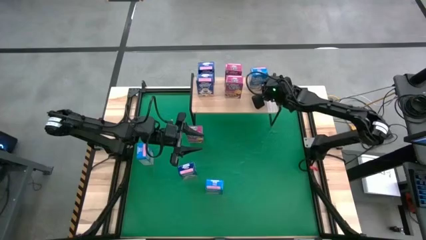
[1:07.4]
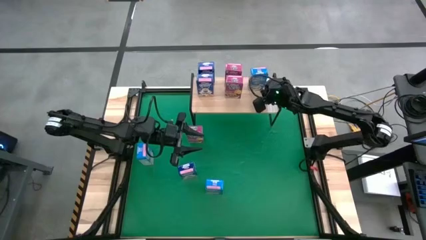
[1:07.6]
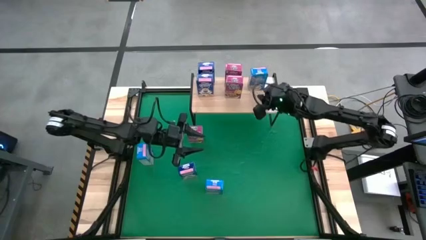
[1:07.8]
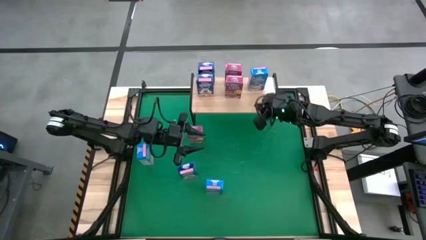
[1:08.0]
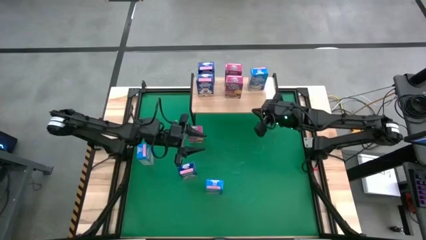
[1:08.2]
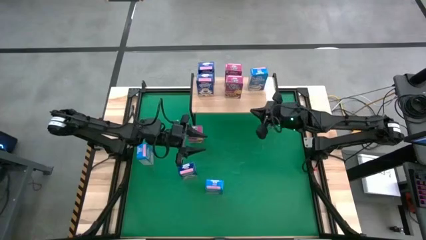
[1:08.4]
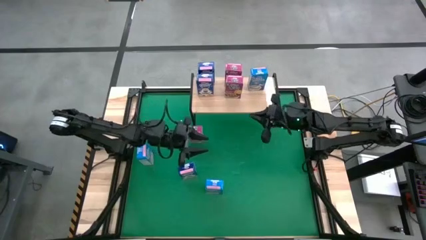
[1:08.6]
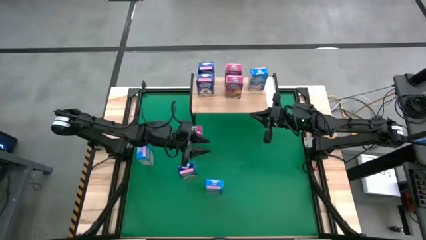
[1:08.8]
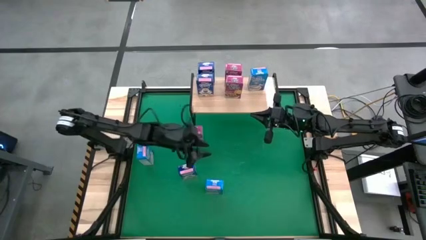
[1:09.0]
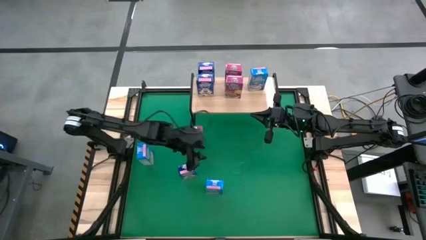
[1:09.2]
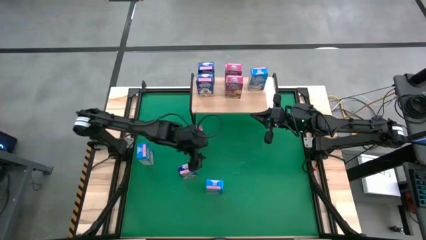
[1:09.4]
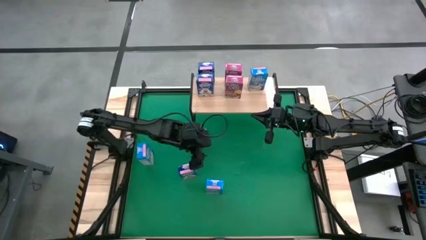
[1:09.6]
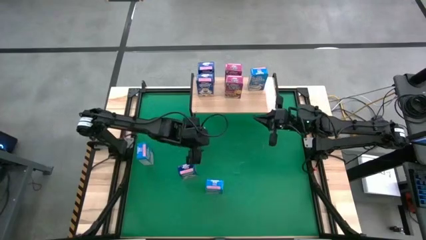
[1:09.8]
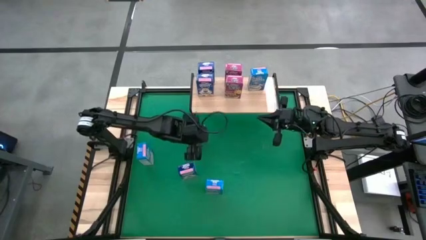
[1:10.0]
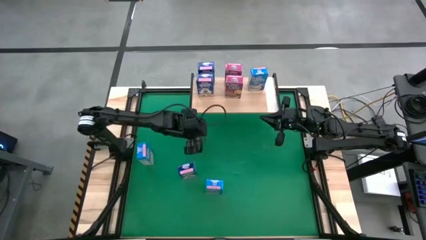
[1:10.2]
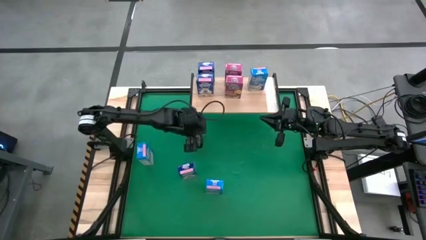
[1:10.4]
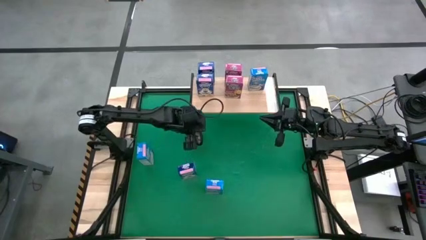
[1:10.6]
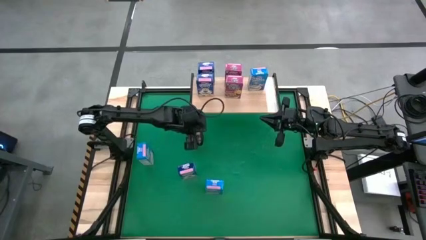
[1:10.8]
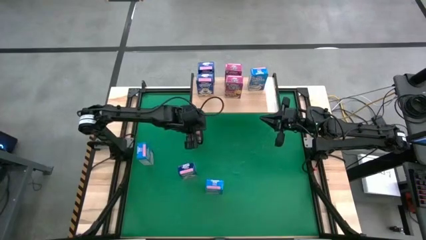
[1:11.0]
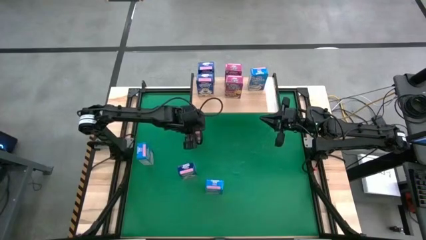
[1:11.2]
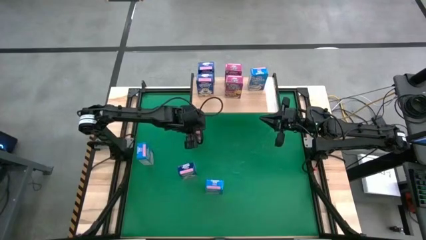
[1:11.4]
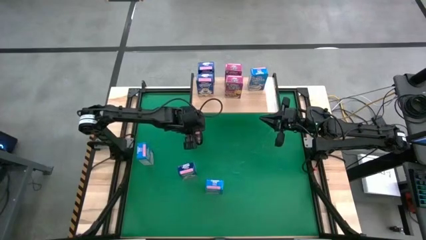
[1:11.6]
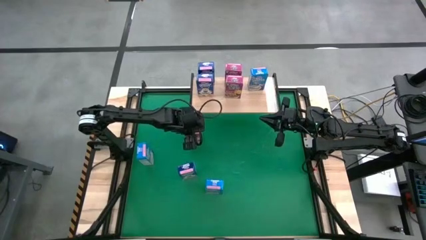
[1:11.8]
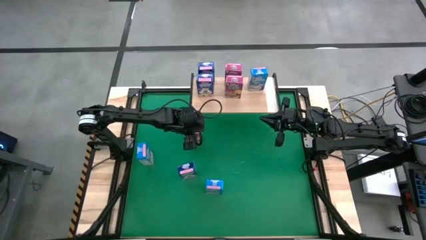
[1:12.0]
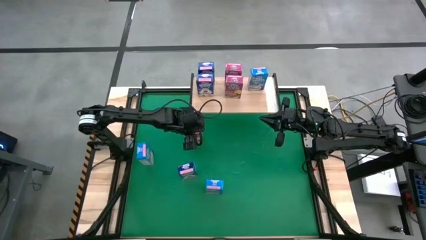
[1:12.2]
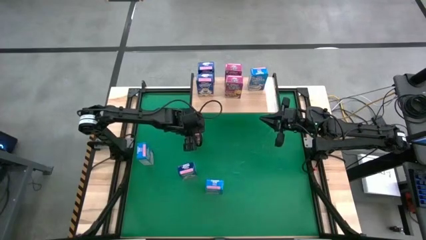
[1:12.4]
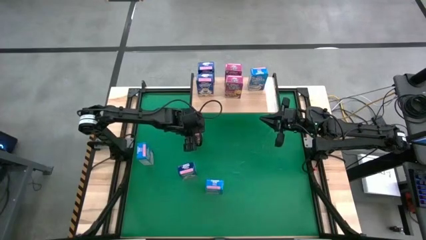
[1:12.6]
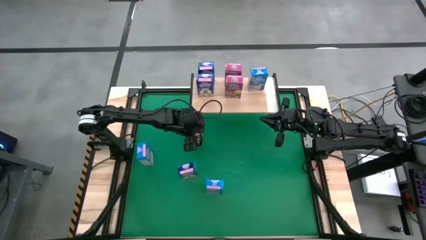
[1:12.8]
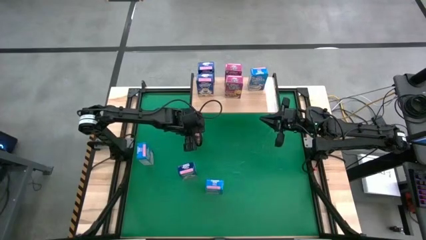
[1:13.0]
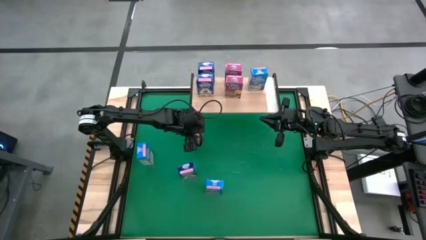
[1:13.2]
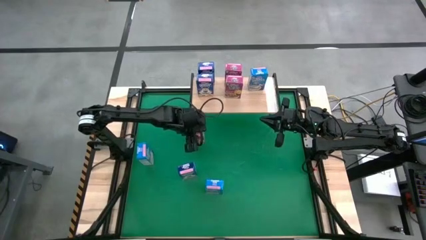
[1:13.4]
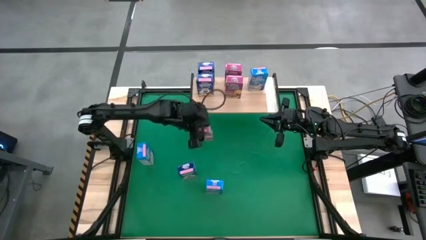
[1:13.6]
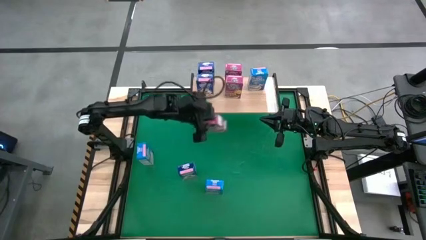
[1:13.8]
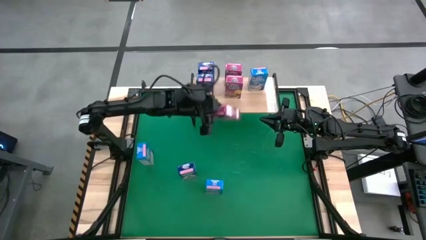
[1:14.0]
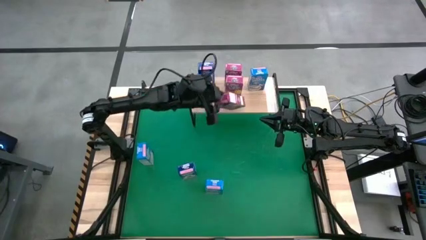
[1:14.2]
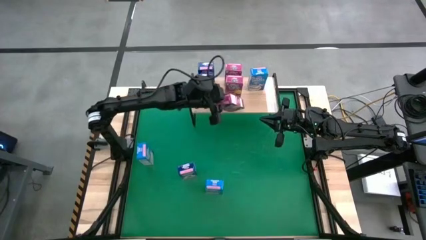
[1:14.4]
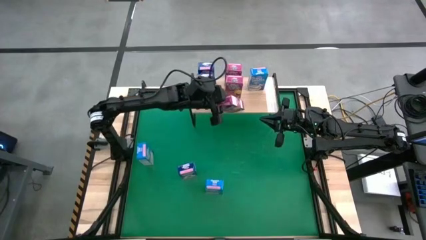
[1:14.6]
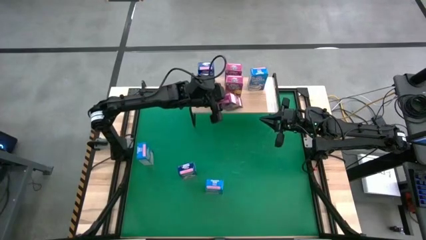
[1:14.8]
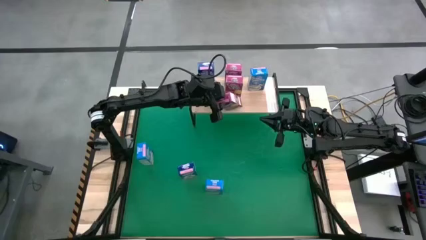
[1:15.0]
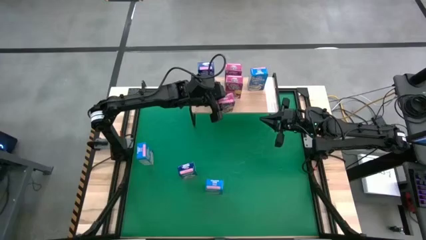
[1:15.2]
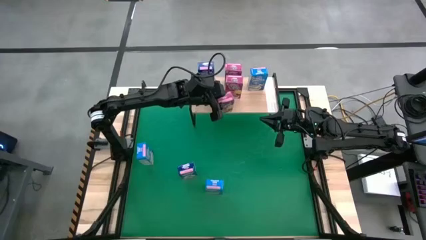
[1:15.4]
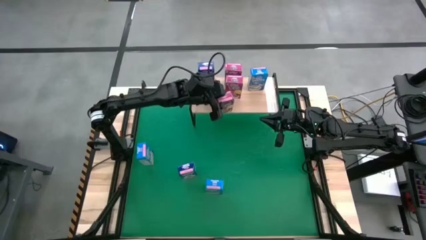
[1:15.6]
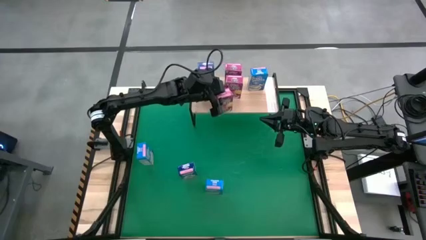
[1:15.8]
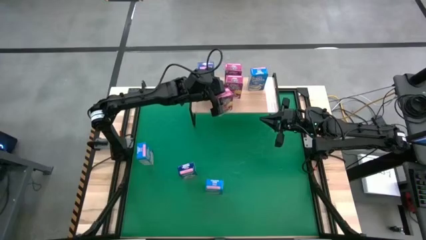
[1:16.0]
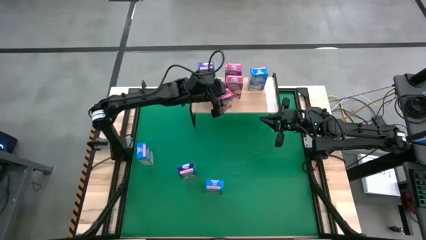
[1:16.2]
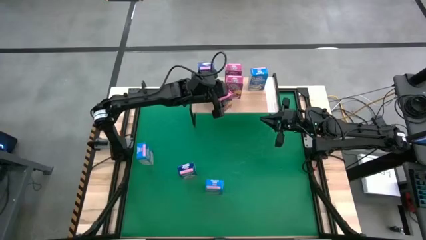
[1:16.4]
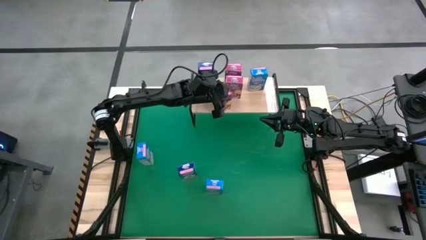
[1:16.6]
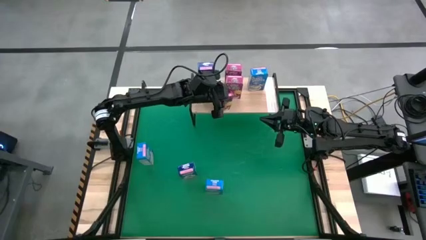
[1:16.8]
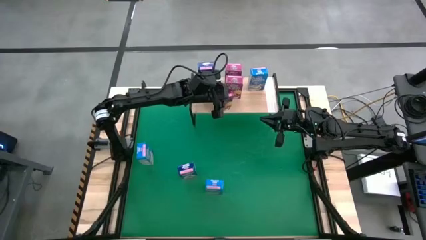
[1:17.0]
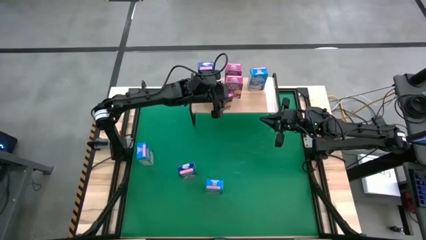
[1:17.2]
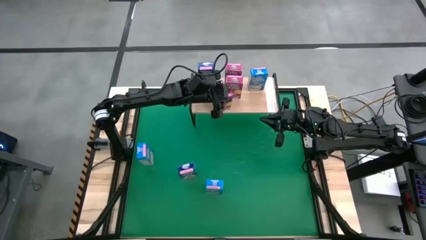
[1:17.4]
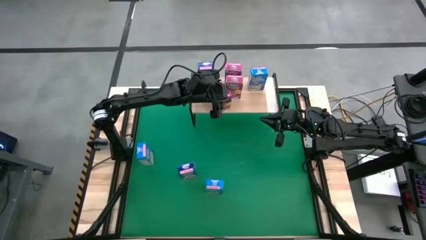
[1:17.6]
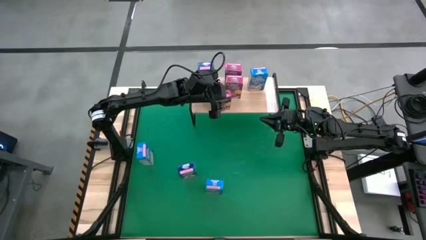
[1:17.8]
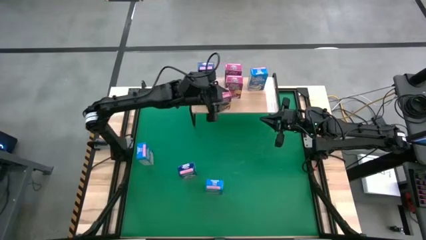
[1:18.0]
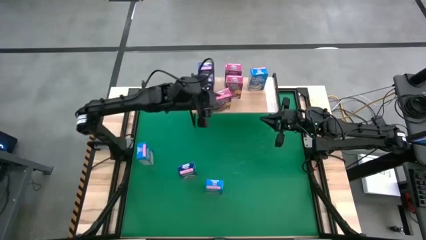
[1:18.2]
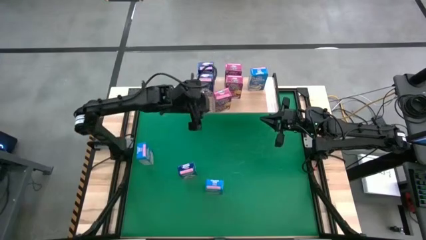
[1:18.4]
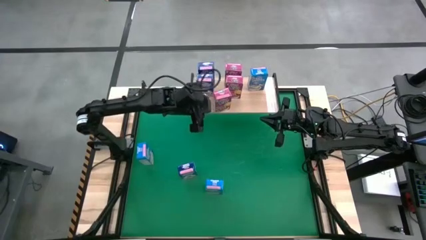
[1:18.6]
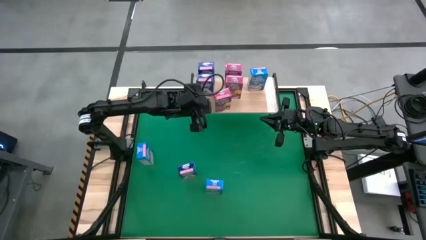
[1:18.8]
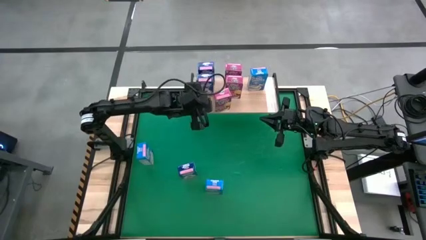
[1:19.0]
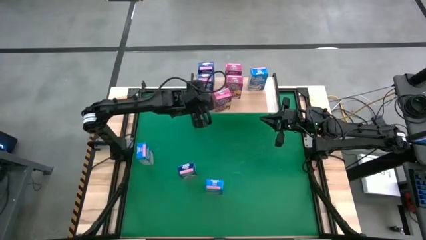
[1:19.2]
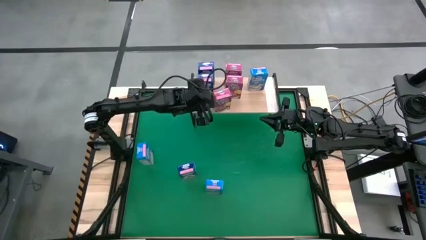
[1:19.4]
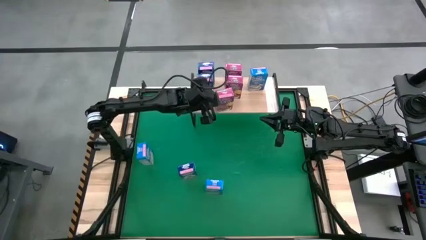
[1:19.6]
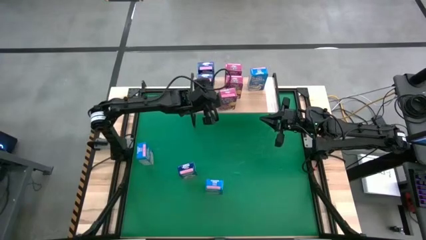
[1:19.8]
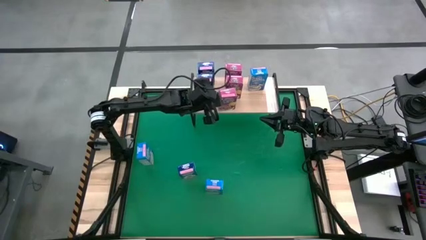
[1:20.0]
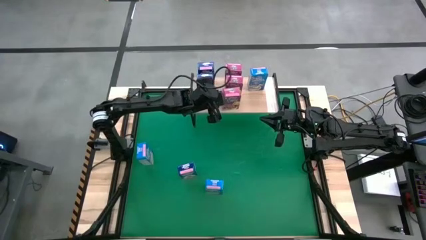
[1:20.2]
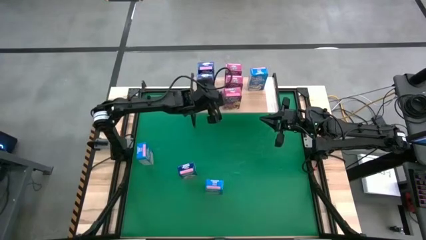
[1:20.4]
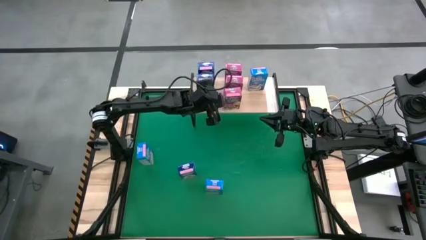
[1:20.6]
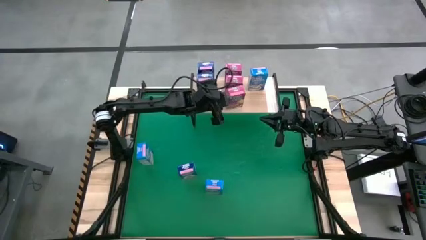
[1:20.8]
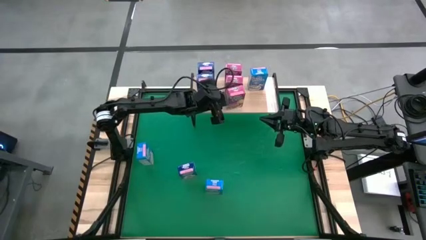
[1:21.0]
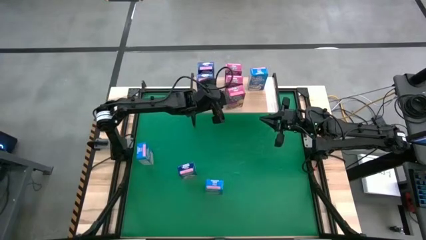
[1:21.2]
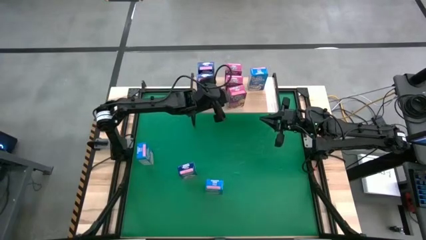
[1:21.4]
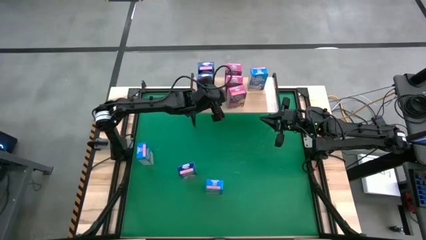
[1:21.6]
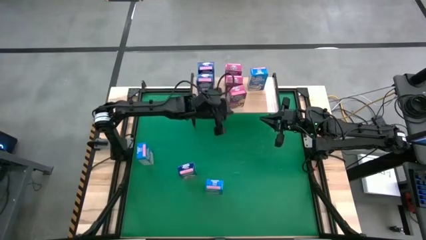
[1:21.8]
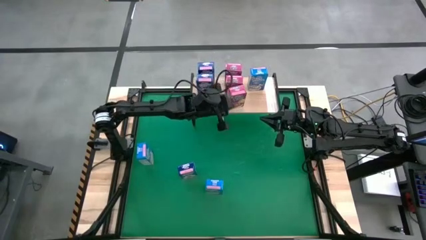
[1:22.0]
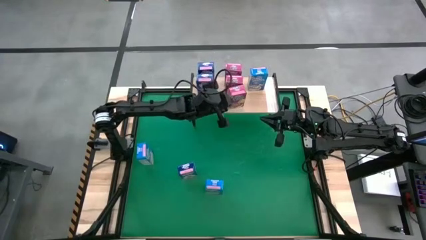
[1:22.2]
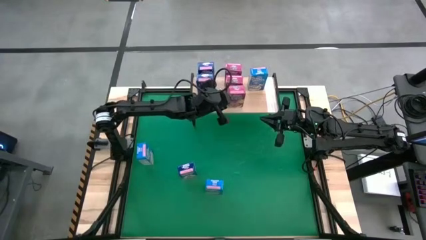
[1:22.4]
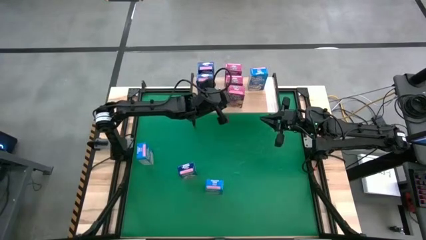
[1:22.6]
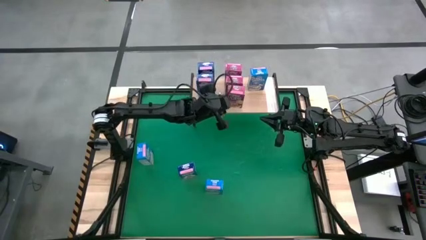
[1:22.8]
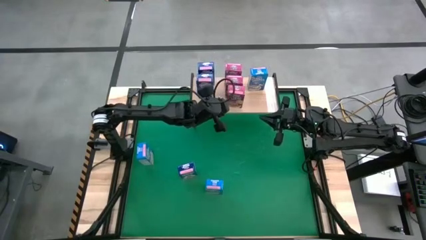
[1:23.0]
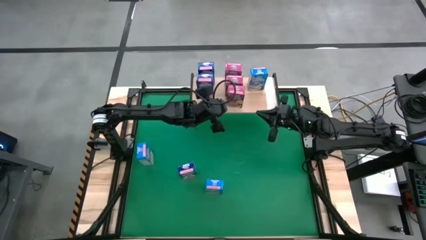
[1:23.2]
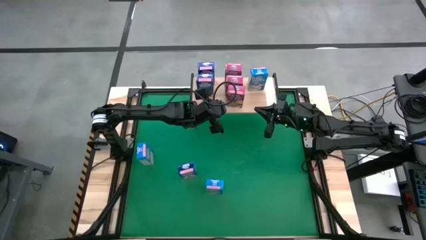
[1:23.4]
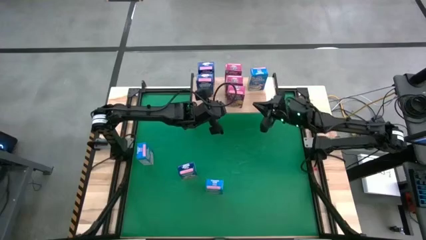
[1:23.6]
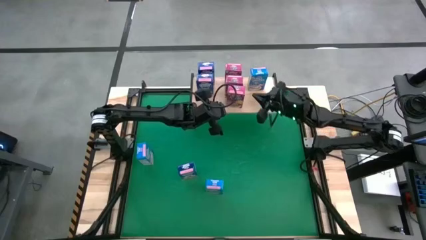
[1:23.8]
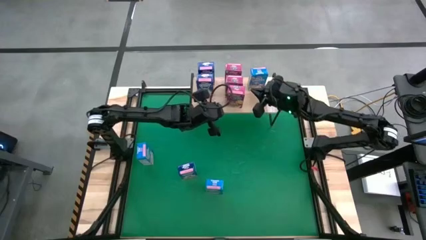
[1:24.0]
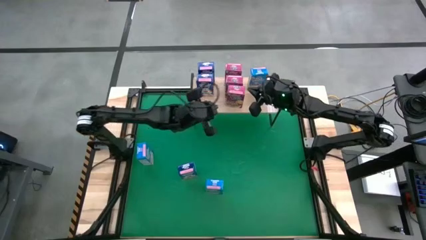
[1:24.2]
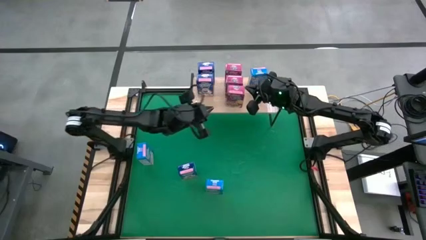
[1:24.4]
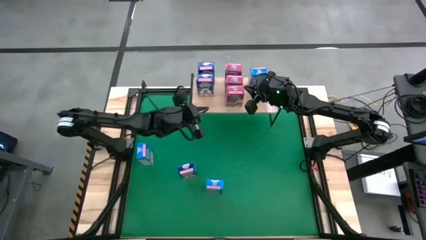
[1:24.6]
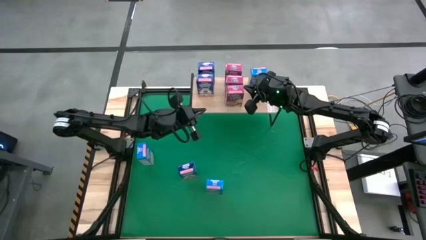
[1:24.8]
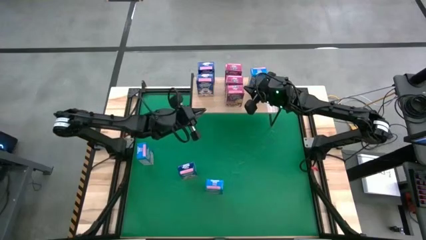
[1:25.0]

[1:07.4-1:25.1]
Task: Stack cereal on shelf
Put the pink cereal on the shelf aligned with the other pink cereal boxes
